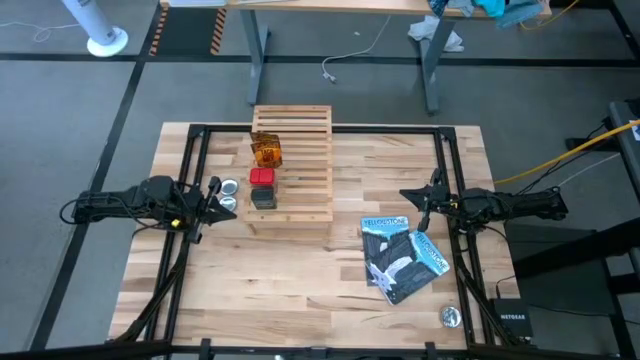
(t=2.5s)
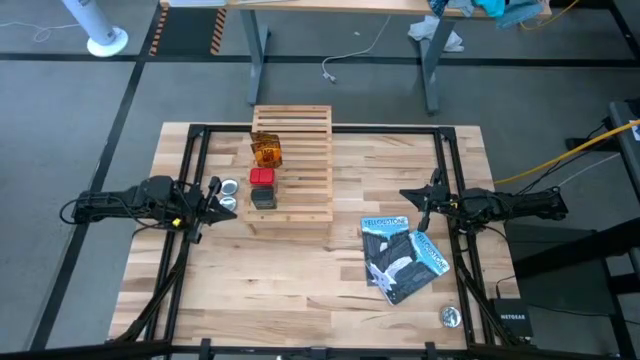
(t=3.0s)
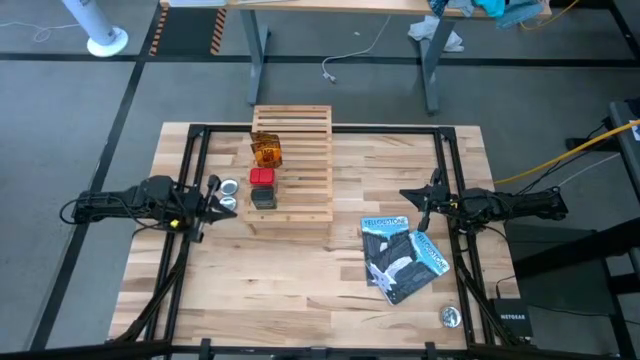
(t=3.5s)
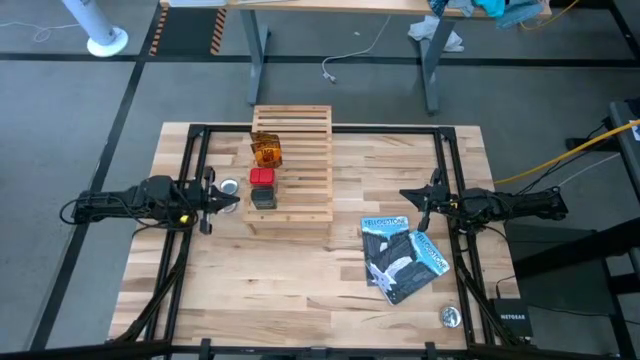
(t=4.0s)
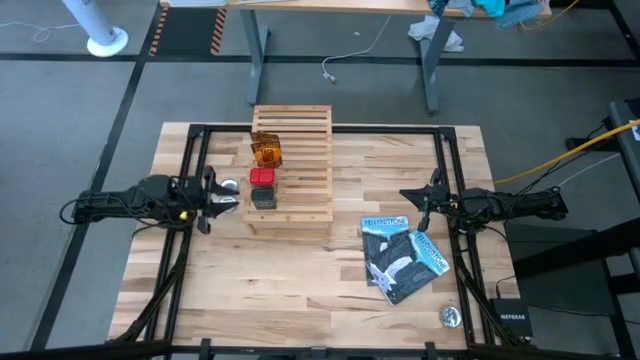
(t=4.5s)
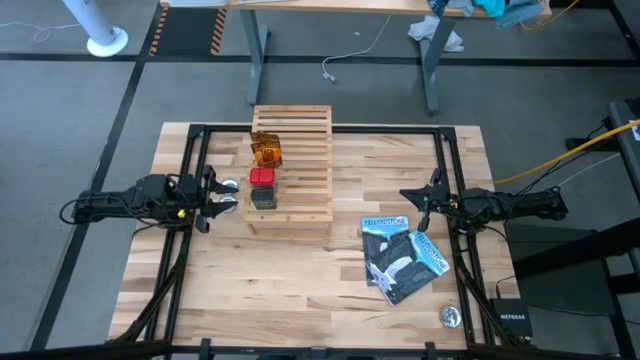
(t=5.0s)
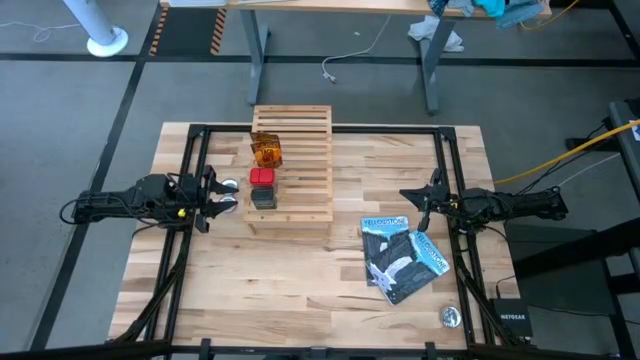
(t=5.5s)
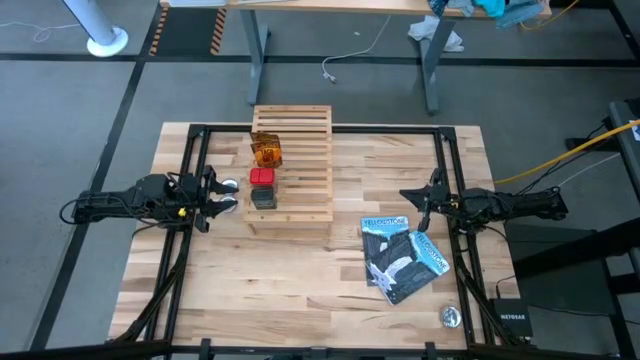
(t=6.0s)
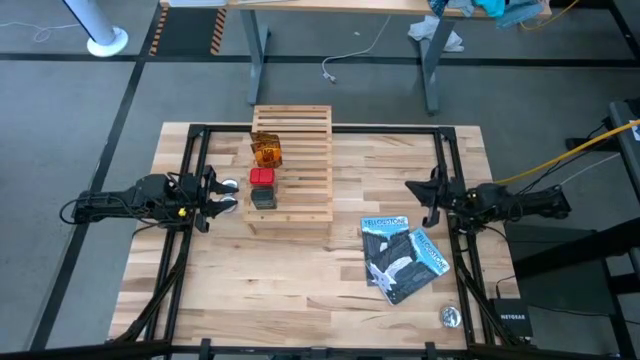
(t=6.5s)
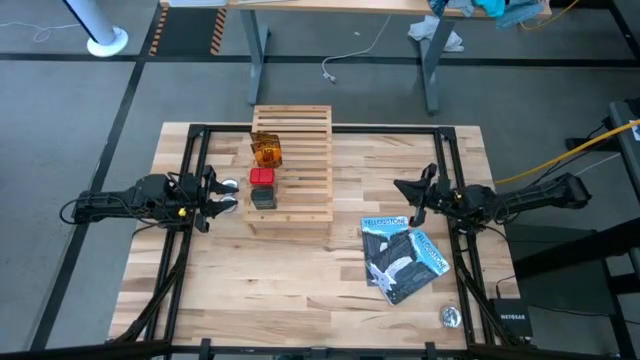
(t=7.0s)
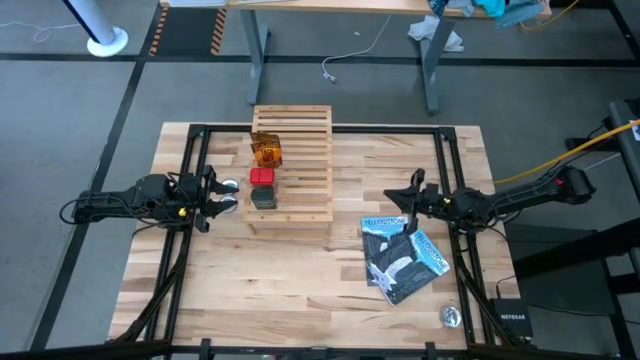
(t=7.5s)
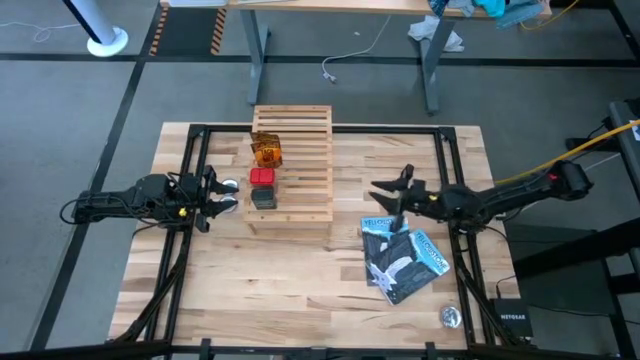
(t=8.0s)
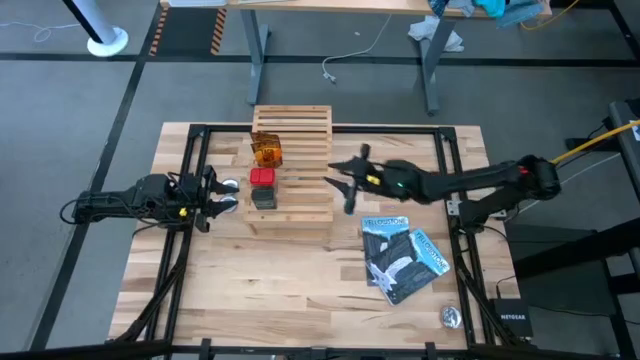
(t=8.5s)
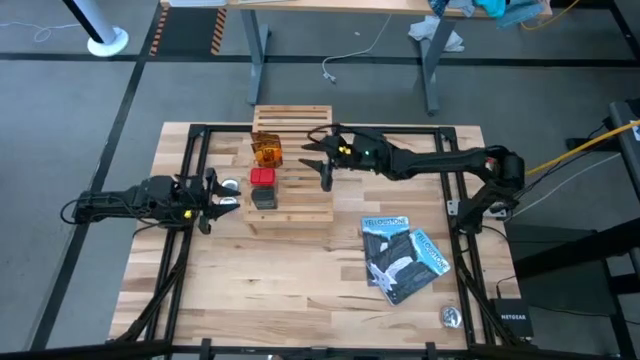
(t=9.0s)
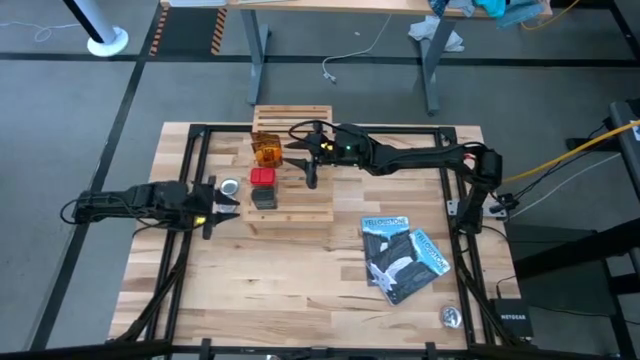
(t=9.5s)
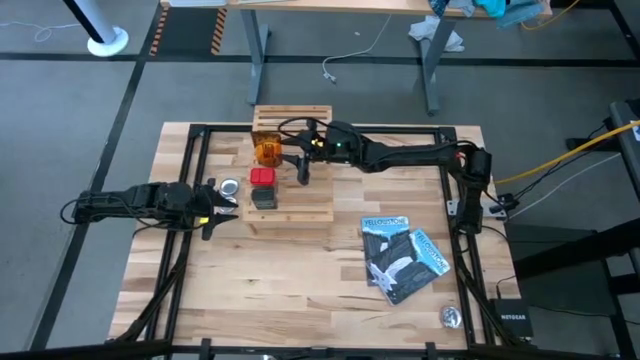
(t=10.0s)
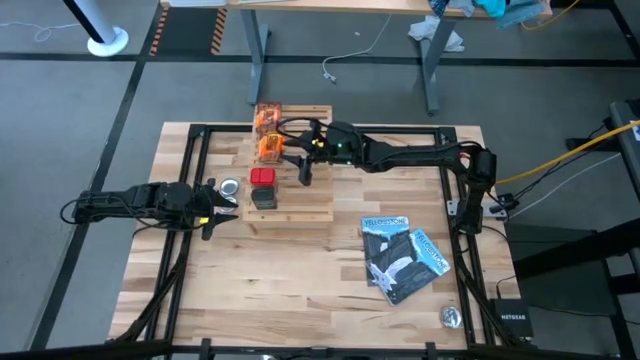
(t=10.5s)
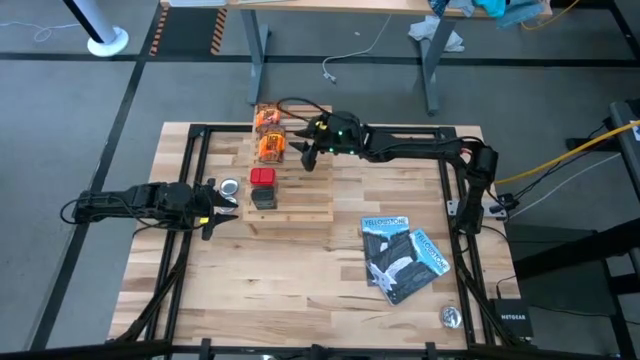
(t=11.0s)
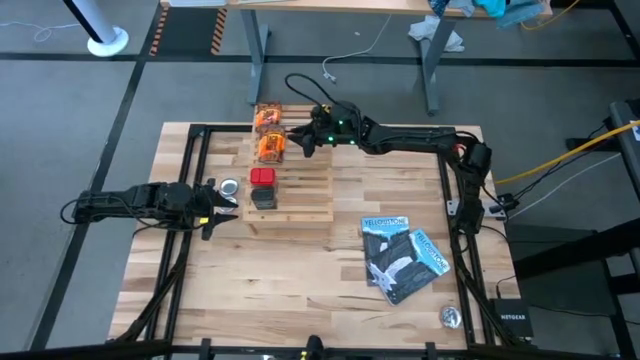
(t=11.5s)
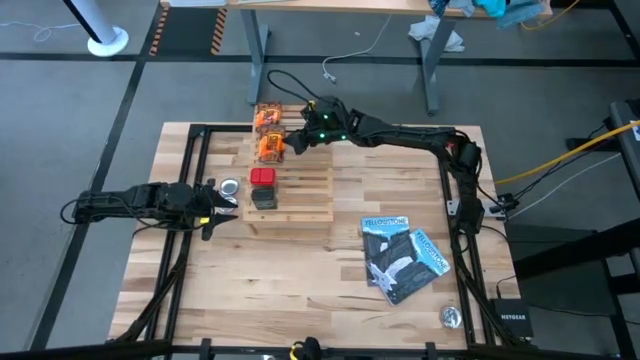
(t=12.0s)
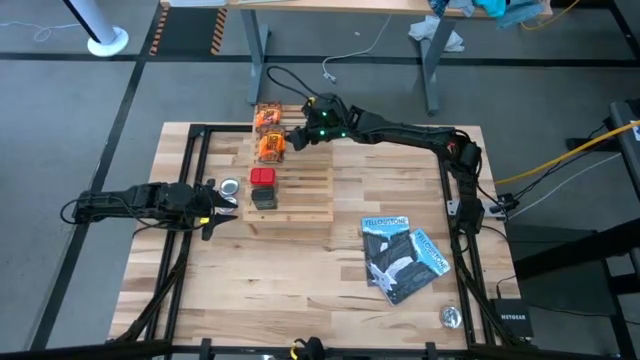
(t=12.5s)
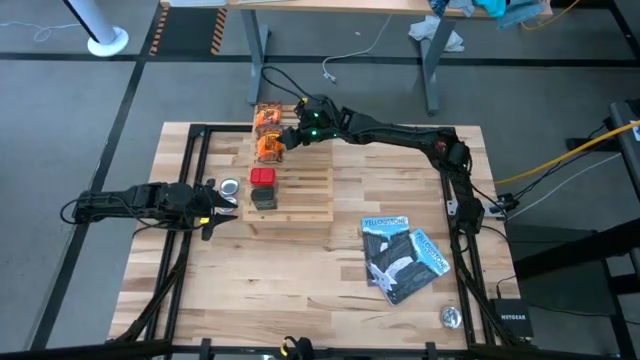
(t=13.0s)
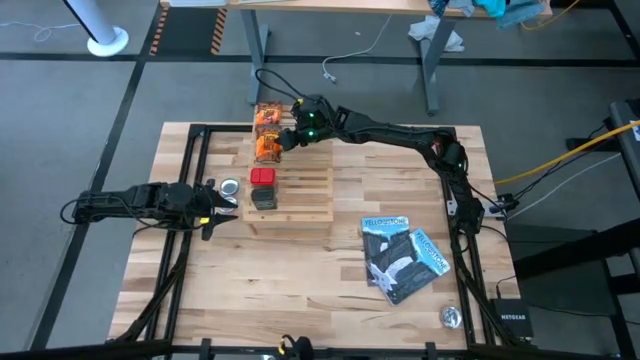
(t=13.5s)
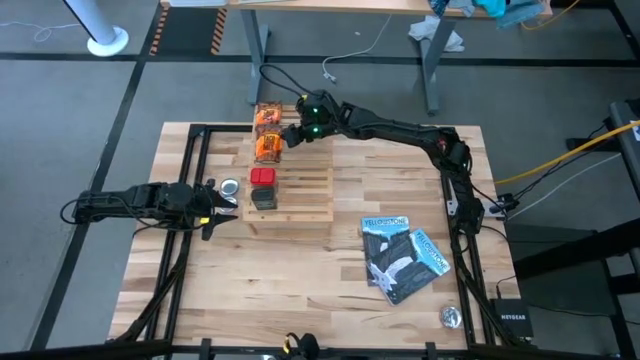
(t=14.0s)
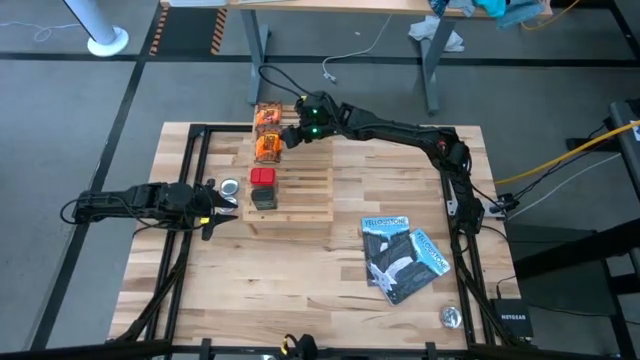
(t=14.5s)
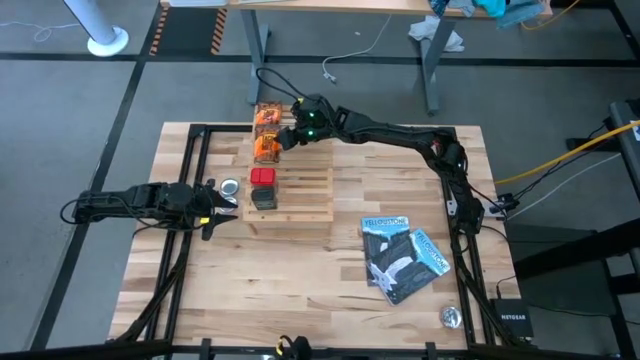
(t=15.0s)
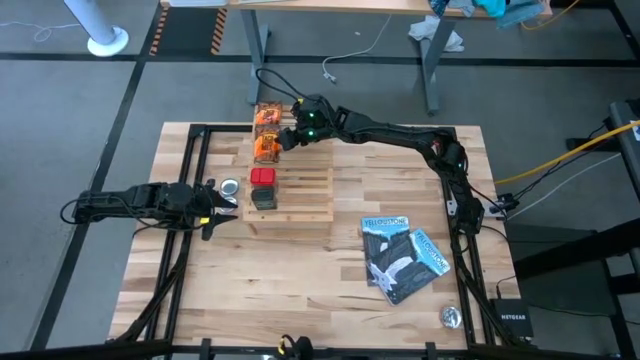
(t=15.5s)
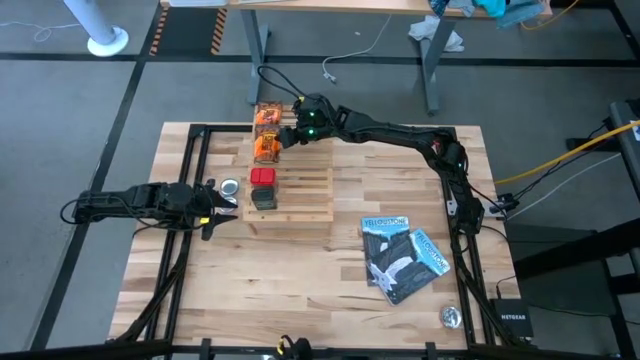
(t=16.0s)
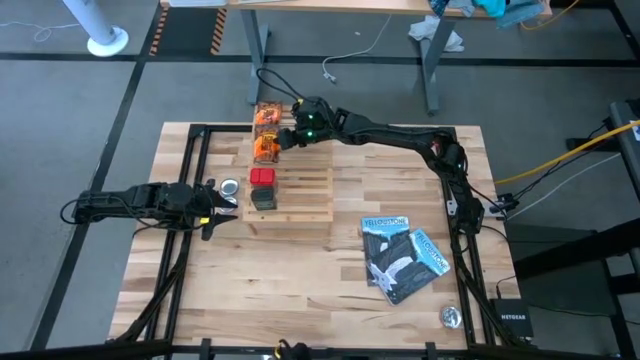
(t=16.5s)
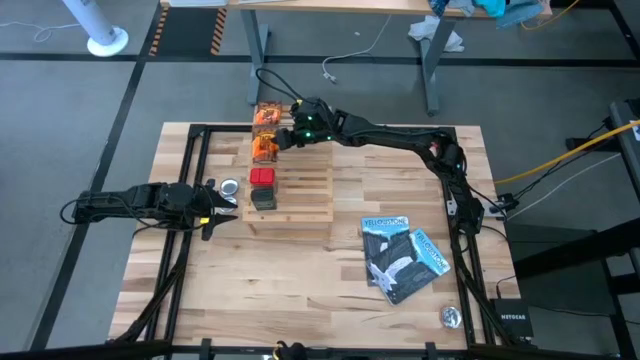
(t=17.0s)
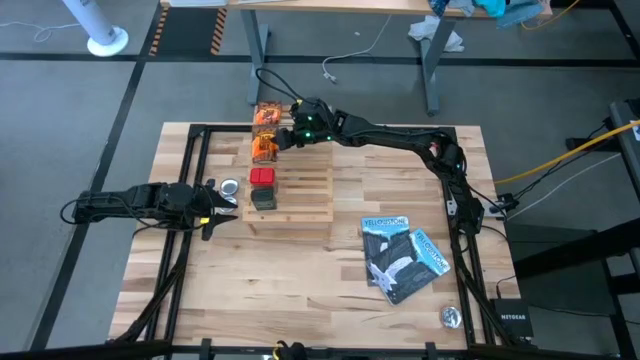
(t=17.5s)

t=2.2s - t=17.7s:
Task: Shelf spices
Remove the orange seasoning pack from the shelf

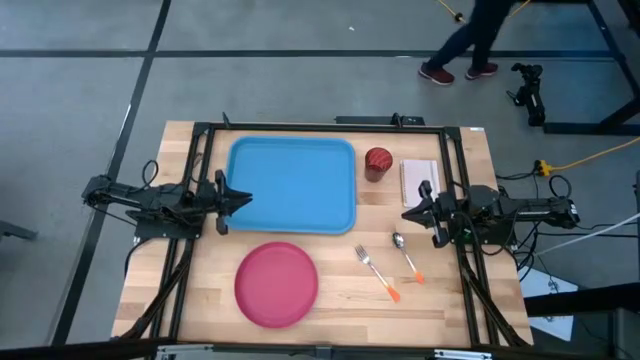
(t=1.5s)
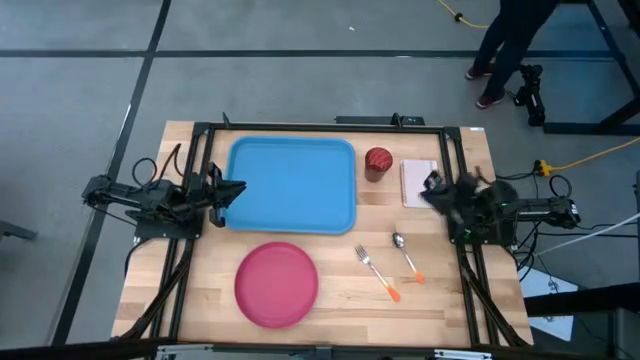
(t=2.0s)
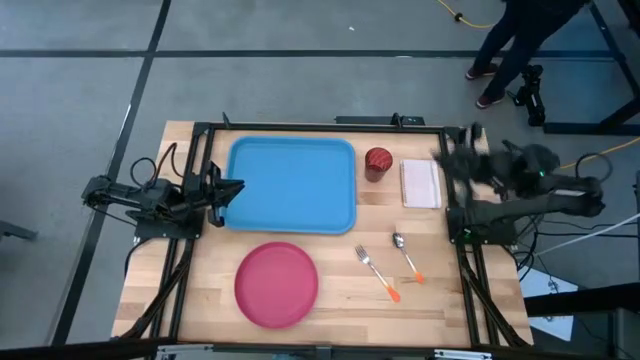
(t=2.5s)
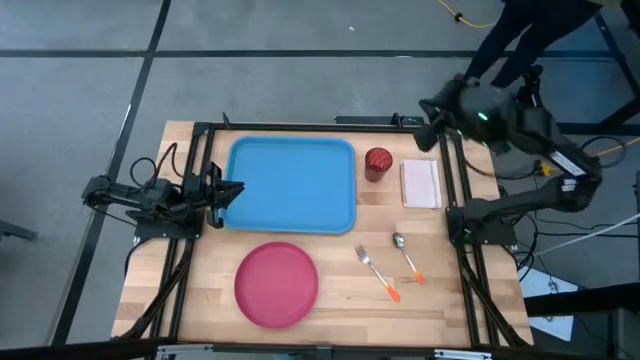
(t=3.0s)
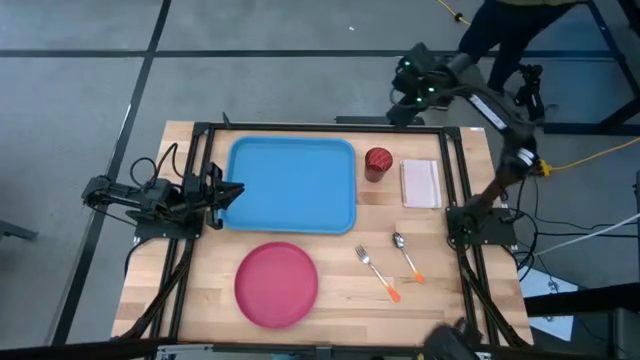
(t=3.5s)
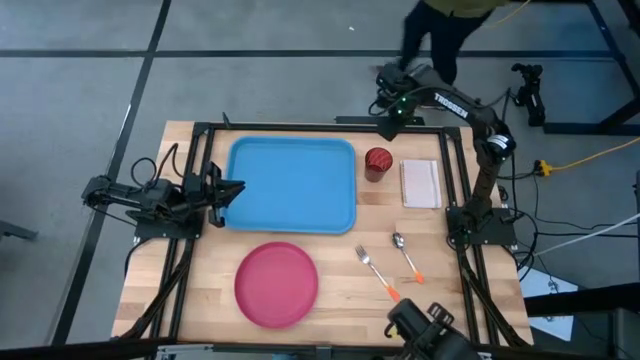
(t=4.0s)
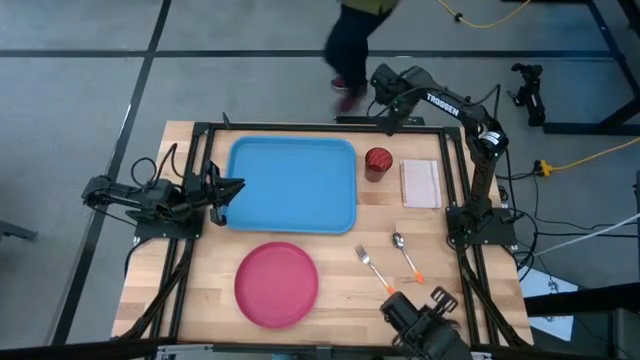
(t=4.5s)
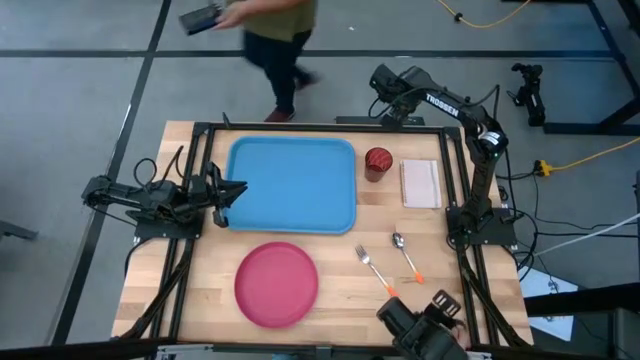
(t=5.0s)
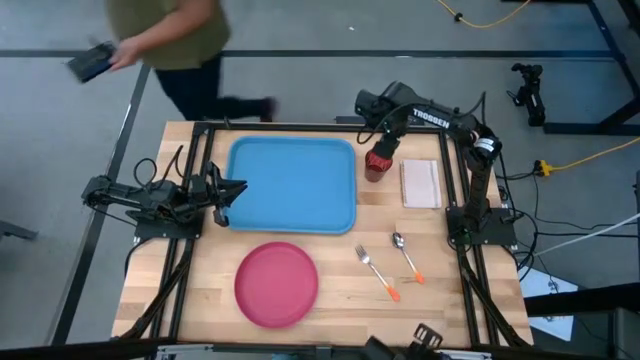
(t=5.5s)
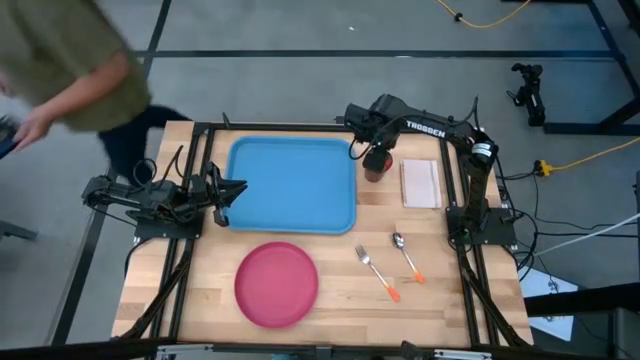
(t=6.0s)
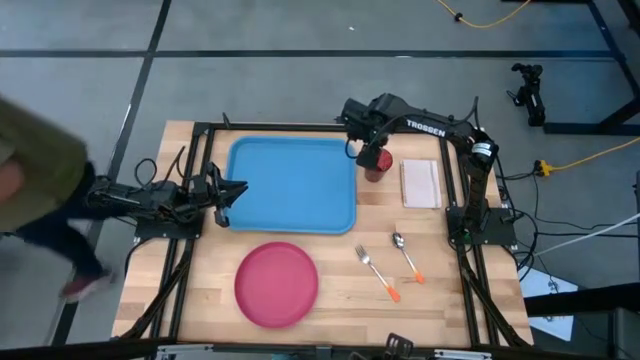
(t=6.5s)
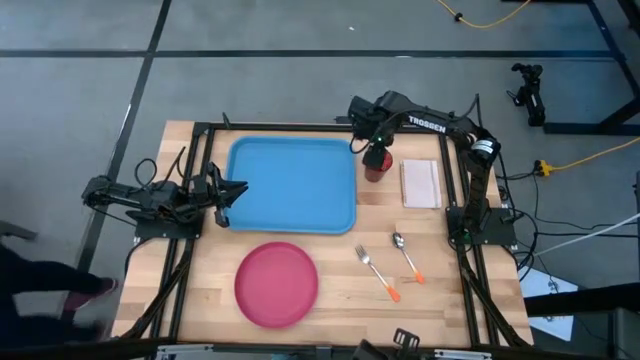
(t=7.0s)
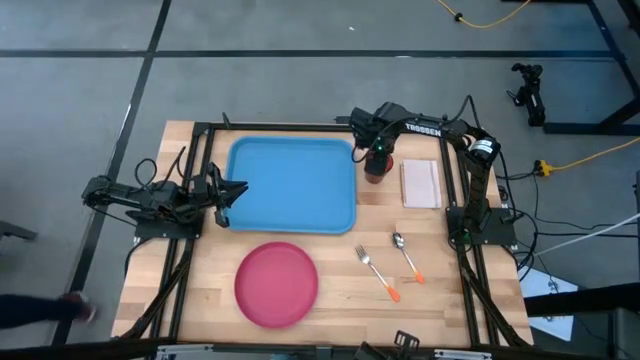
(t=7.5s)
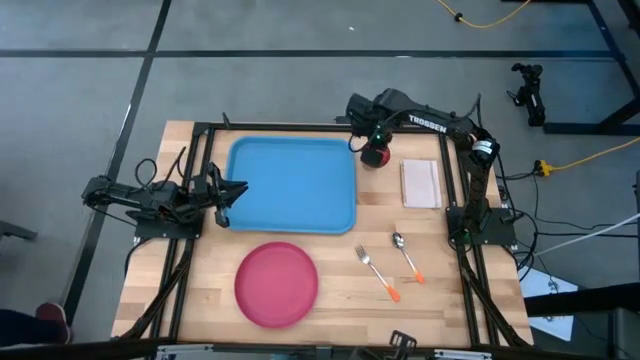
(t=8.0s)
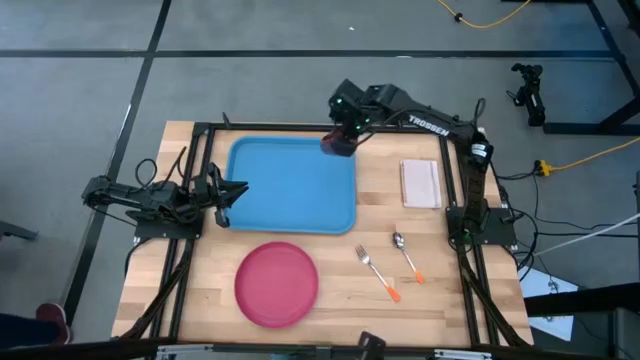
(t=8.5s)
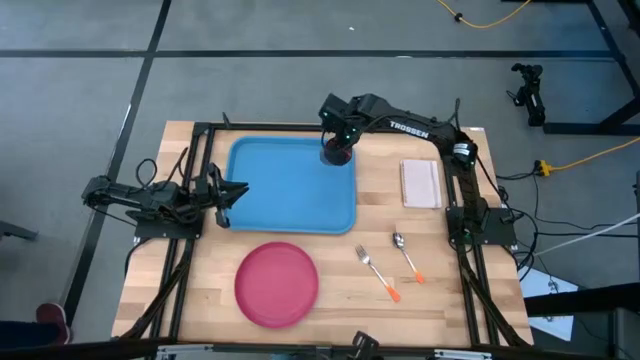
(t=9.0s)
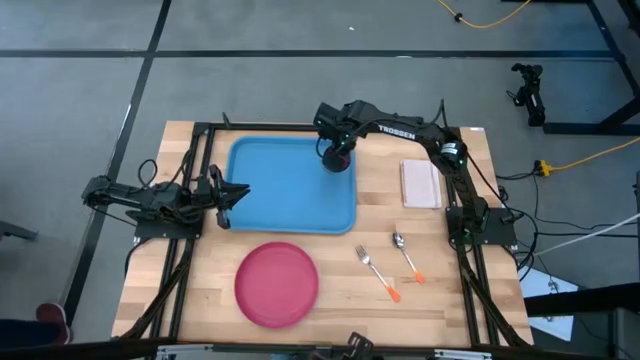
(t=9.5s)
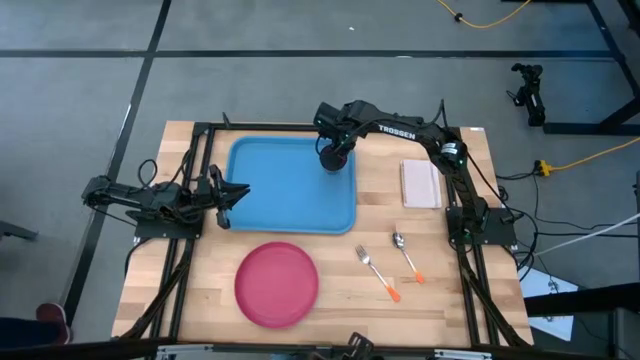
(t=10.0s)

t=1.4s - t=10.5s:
Task: Pick and place plate/cup/fork/spoon on tray
Put the red cup on the top right of the blue serving tray
